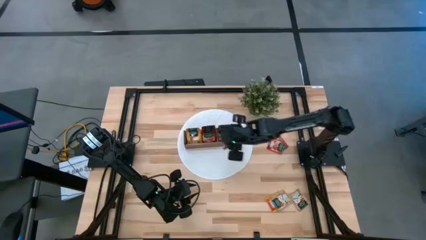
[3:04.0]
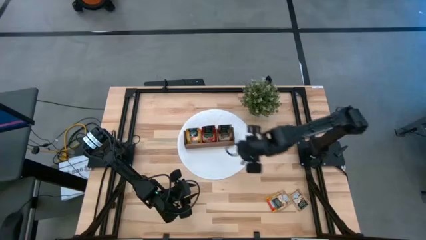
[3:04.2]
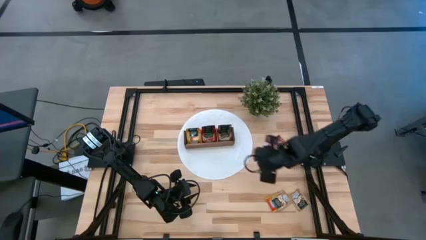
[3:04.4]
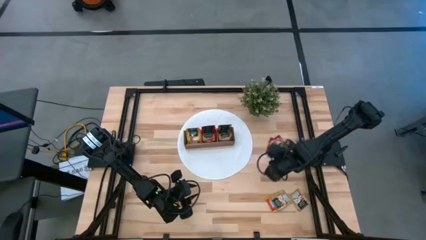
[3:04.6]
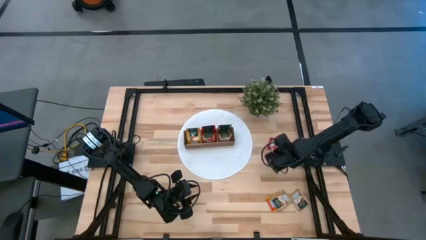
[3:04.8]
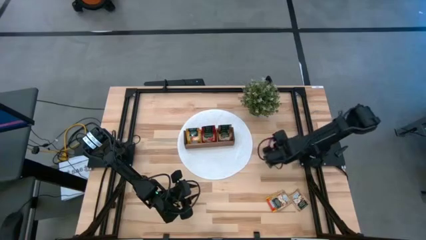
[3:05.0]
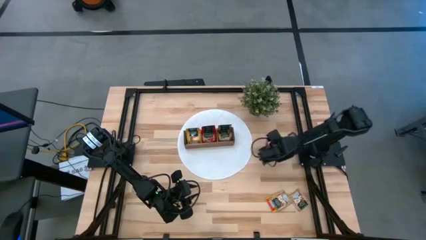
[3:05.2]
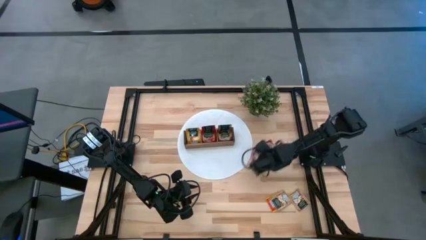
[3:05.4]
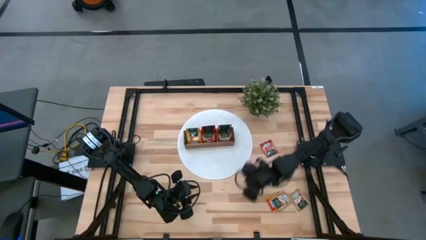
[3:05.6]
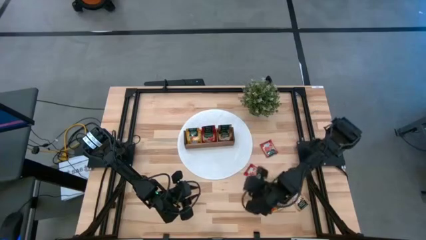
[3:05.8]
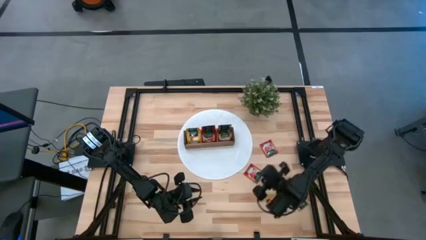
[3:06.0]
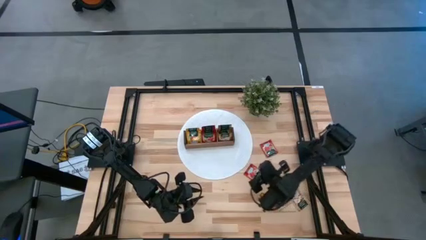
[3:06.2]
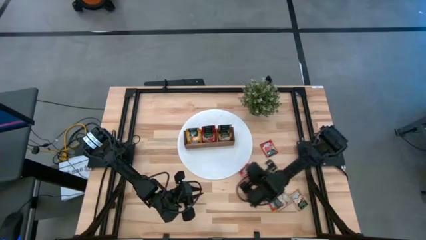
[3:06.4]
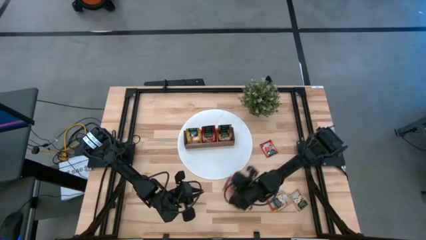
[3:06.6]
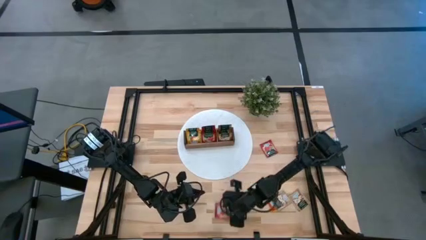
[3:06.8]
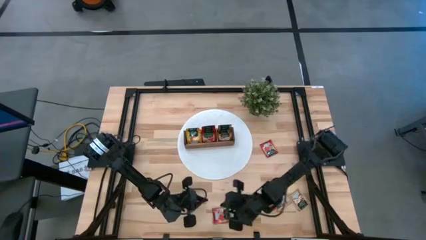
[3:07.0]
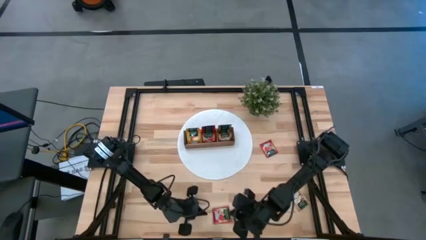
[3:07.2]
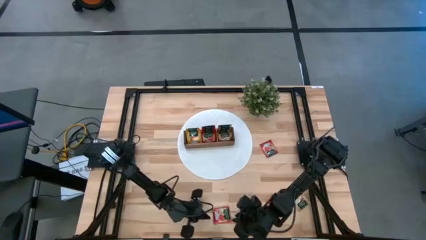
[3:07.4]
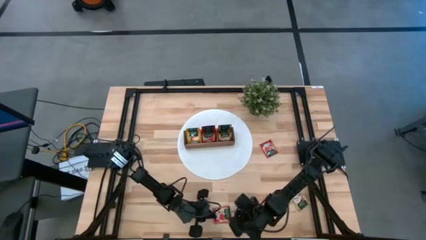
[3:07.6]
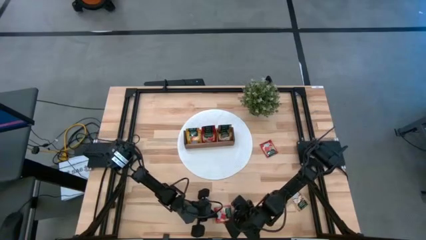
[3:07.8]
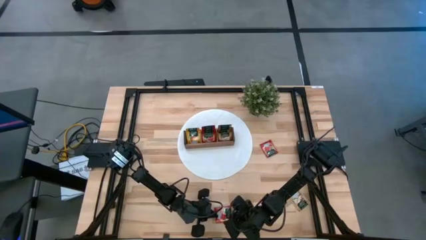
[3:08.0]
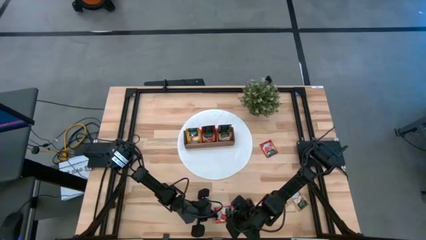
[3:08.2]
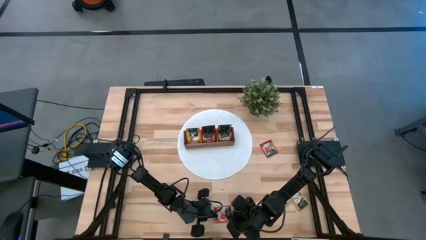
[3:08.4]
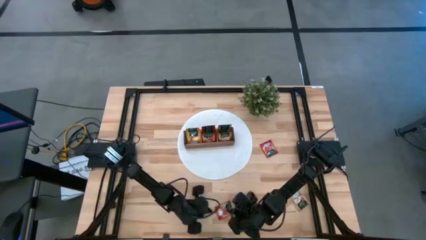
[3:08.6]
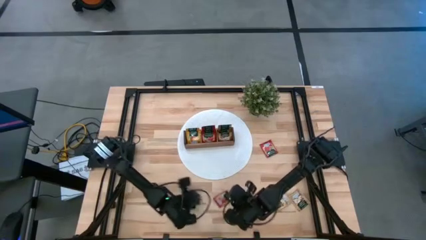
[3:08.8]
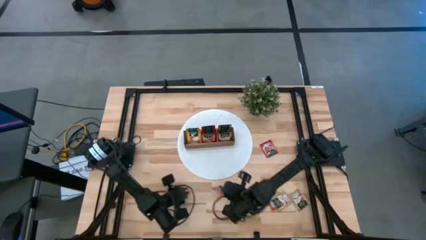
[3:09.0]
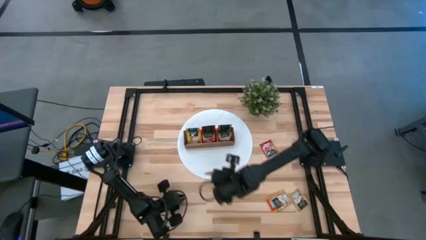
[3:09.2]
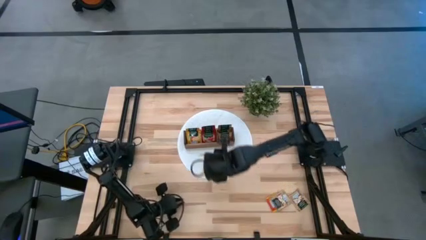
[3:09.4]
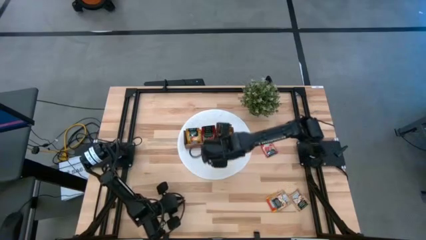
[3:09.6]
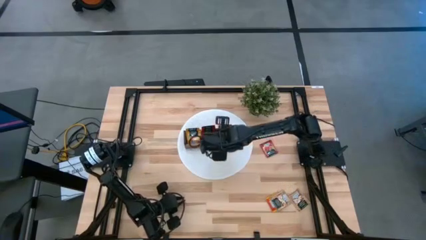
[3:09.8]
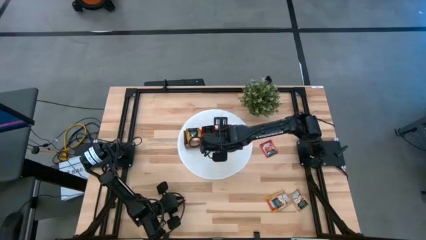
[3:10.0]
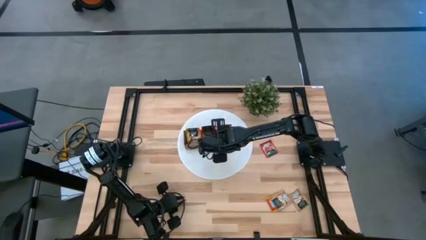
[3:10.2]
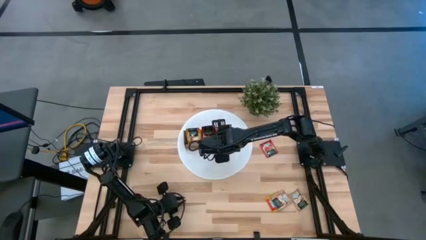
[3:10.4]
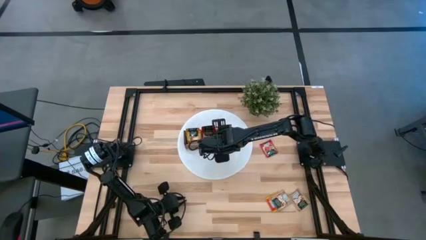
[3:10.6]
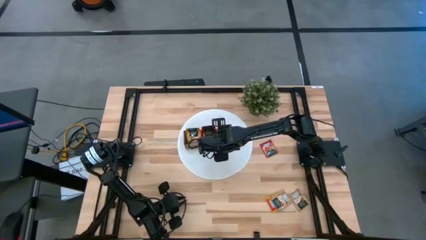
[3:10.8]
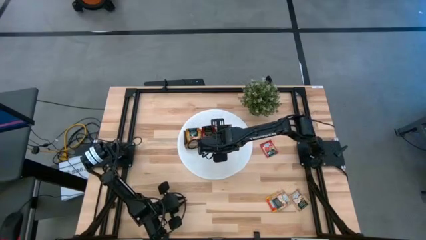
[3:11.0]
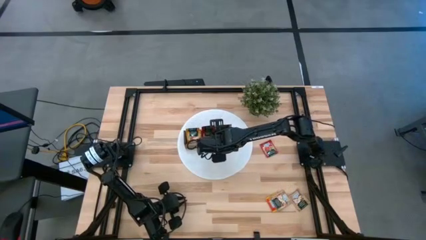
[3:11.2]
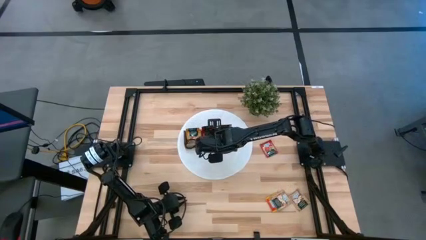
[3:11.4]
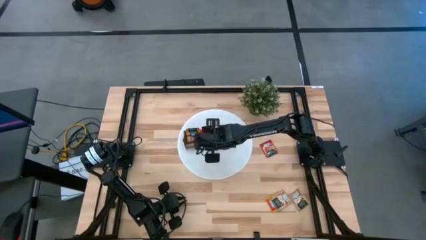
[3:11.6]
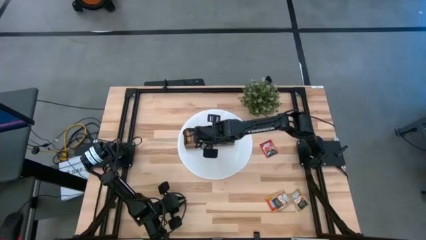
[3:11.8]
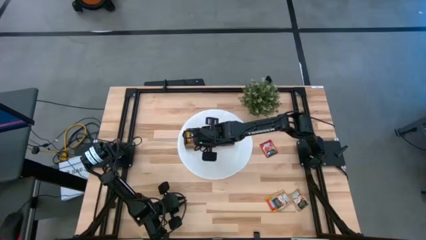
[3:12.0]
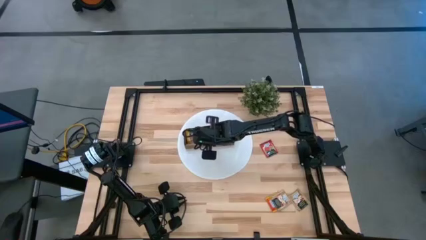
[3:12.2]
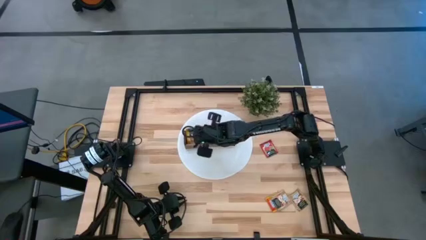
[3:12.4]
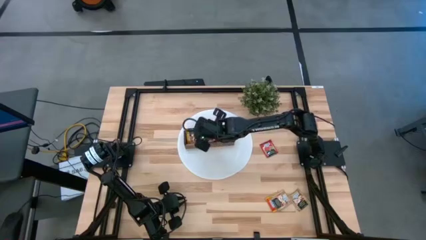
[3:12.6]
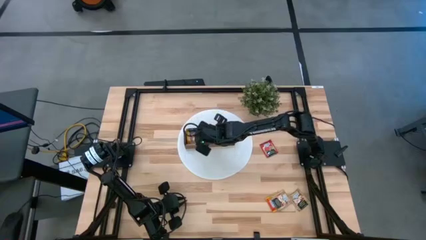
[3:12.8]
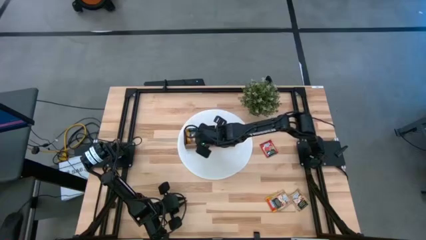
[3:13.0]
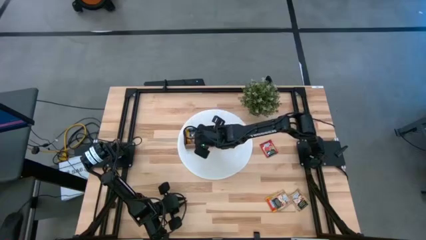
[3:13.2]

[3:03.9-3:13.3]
Task: Pick & Place Tea
Put the red tea bag into the middle section of the wooden organizer

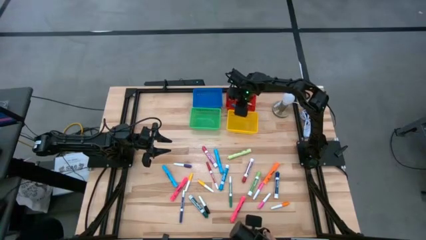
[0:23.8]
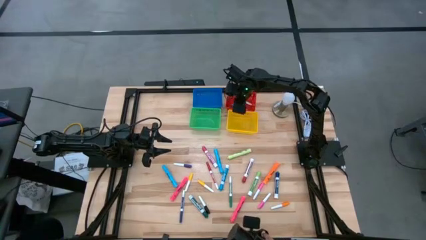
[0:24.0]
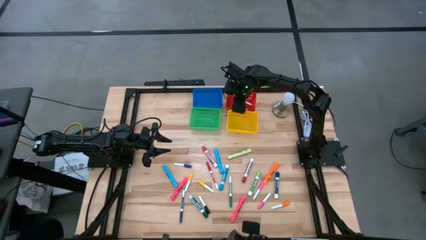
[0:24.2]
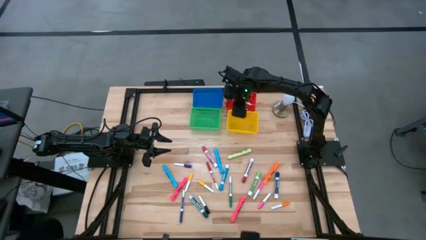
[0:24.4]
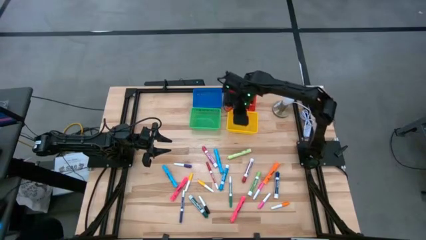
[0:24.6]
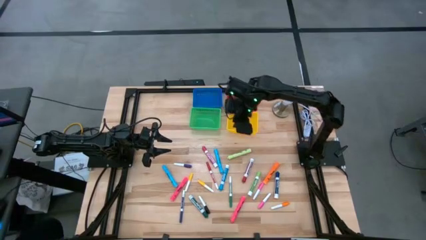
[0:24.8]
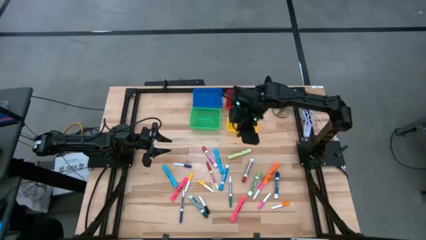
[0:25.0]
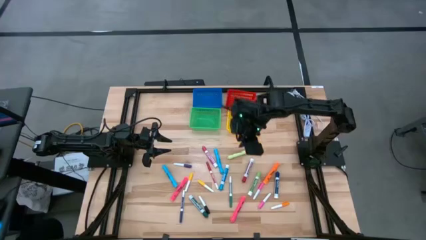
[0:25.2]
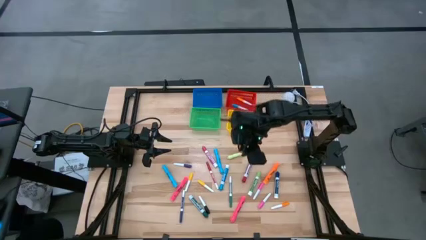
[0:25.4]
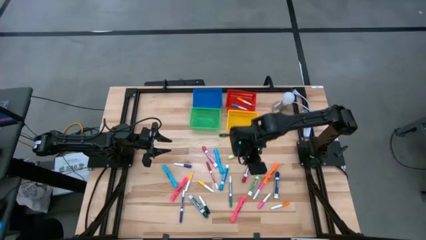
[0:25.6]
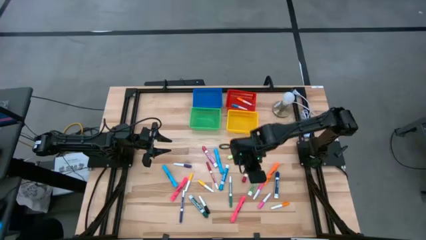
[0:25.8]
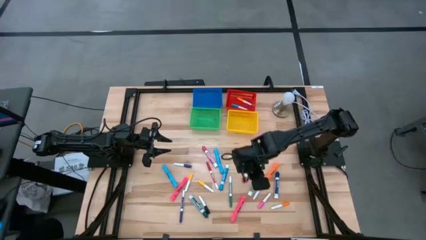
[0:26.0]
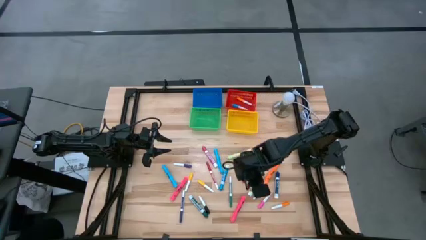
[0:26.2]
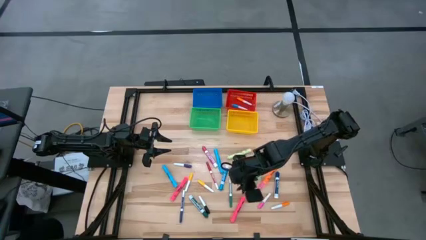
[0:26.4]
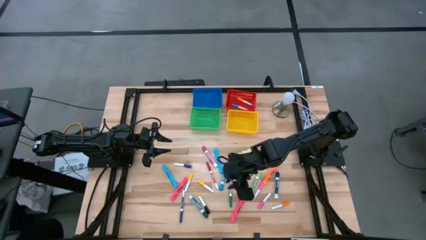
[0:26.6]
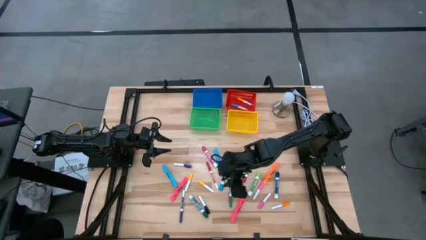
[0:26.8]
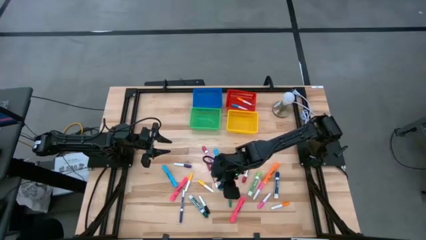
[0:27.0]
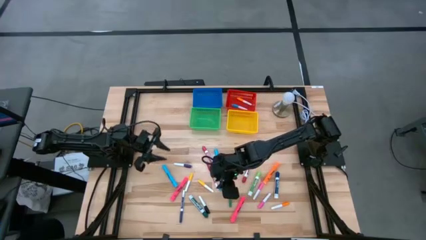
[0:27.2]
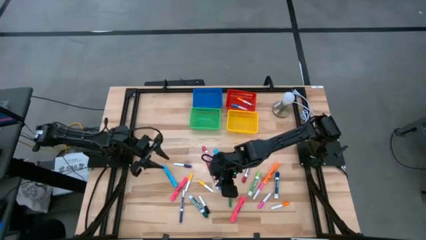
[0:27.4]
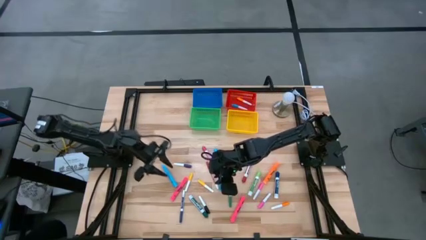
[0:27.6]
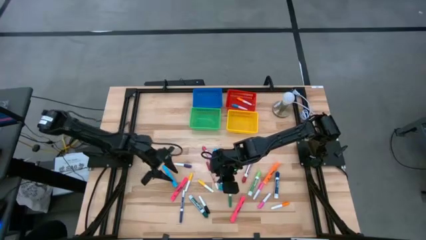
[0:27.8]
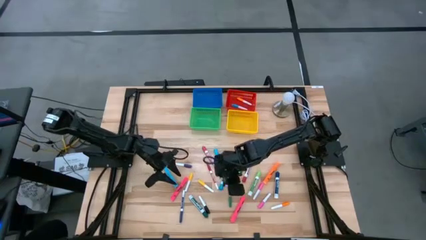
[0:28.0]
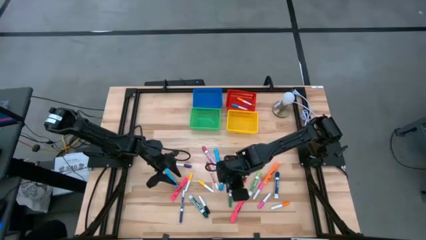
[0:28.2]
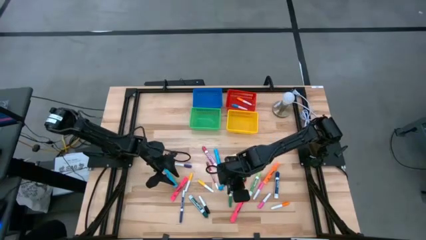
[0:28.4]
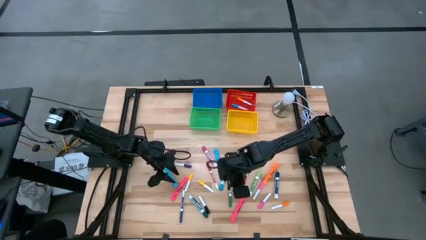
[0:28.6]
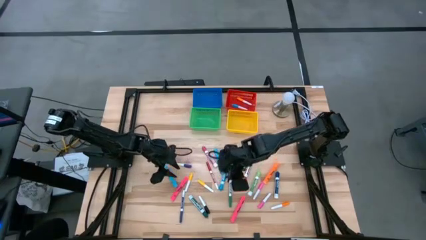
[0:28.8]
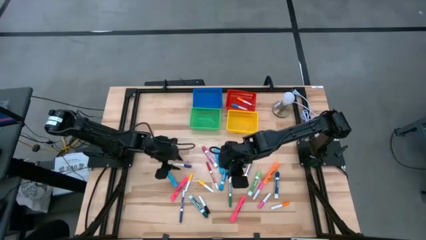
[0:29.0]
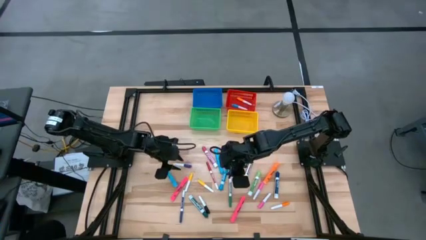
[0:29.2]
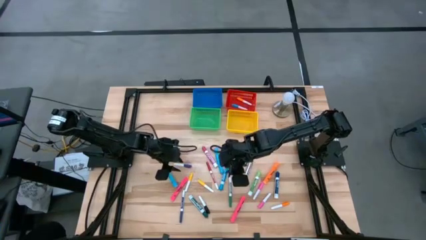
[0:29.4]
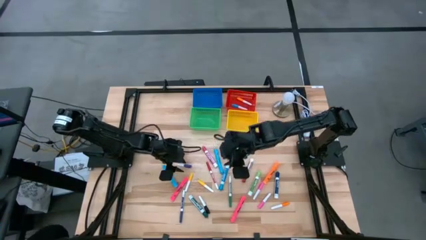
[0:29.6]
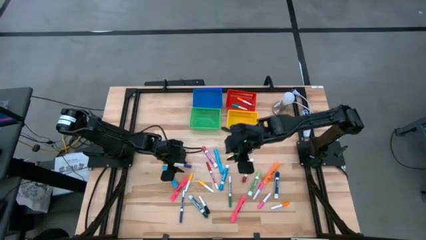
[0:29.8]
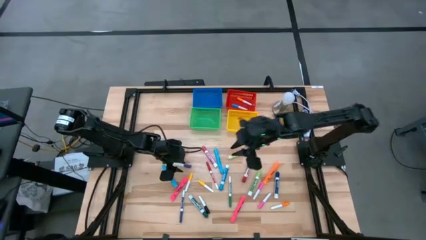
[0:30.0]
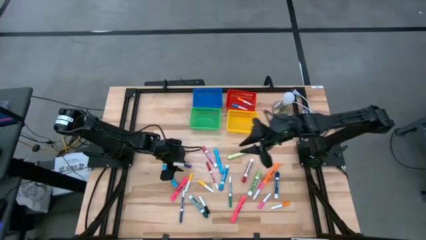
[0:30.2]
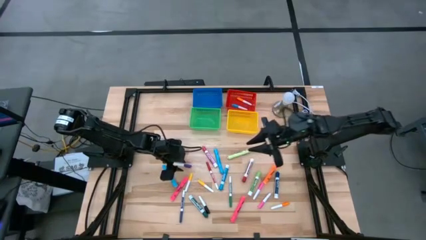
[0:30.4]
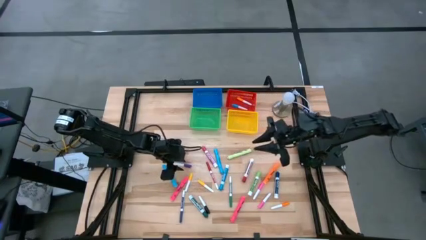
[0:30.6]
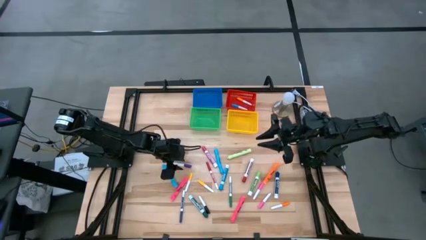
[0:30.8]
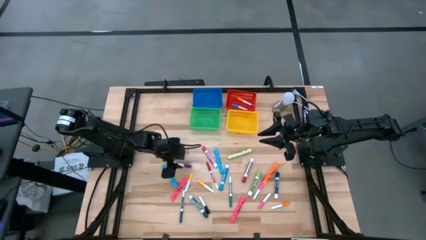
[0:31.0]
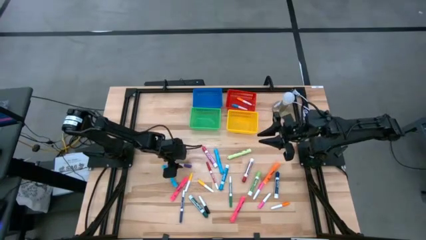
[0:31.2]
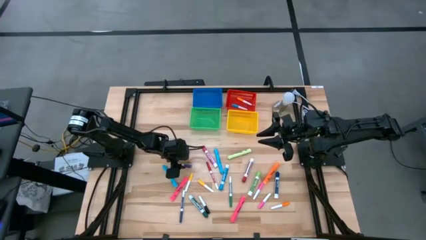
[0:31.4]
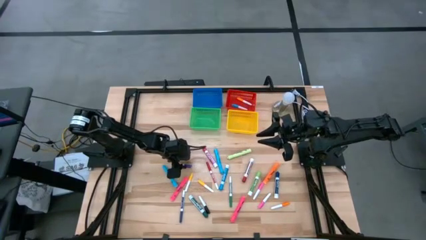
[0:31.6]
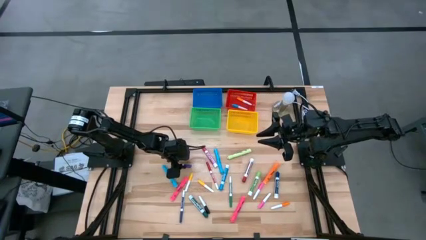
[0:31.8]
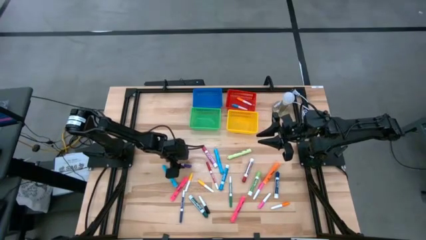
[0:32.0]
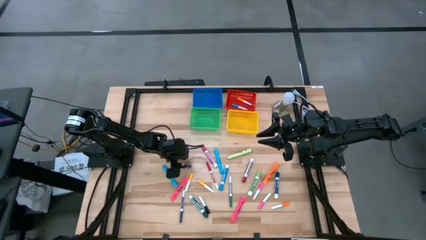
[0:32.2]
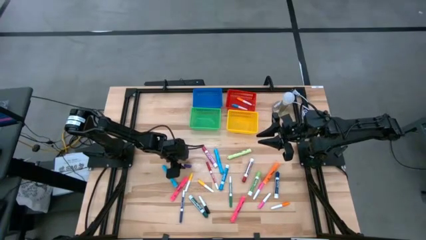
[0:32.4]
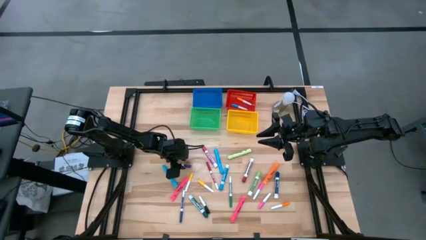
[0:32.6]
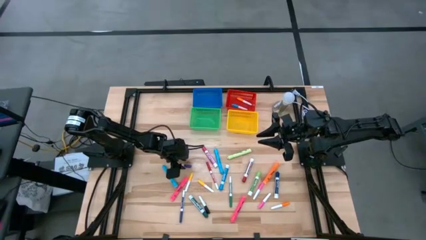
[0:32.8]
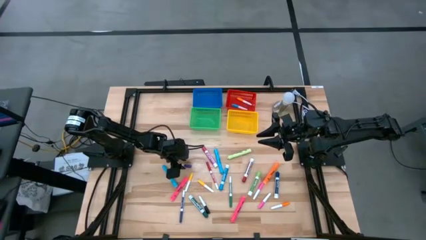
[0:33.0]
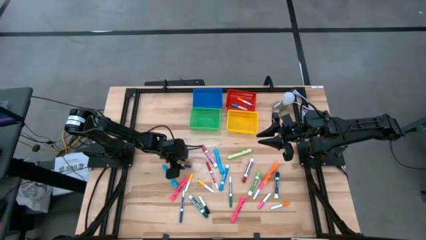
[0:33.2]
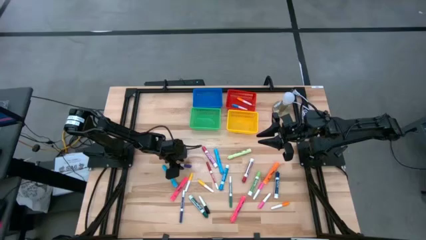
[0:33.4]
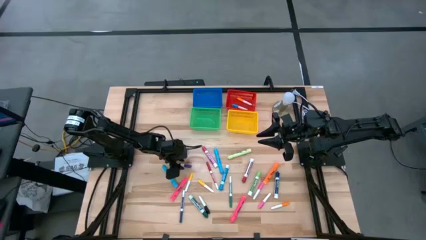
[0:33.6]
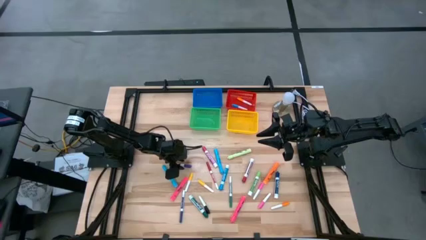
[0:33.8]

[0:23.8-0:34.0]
Task: Pick & Place Markers
Put the purple pen into the red basket
